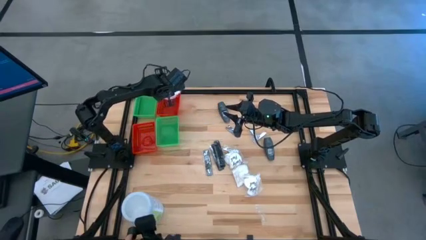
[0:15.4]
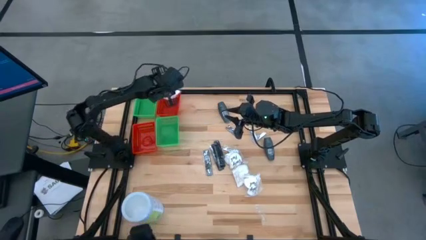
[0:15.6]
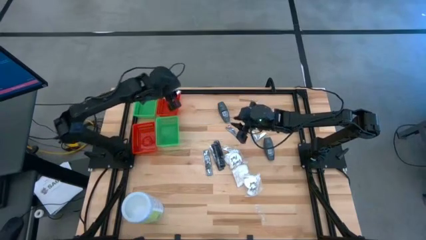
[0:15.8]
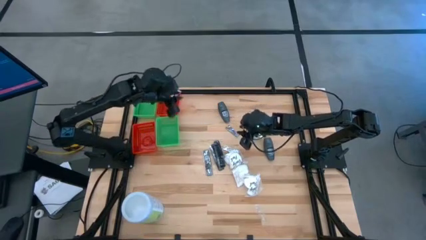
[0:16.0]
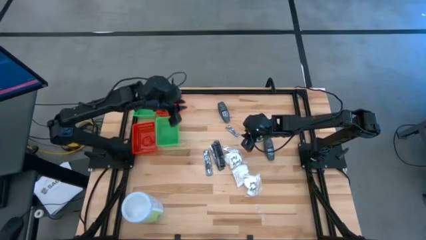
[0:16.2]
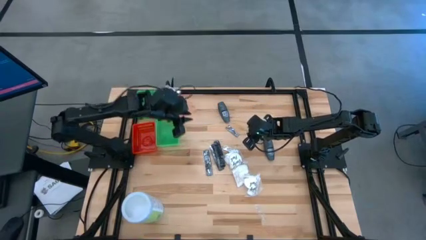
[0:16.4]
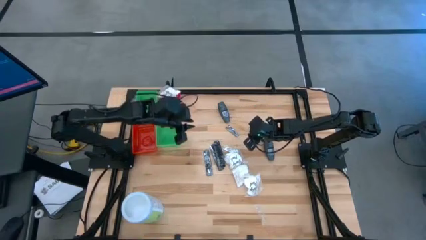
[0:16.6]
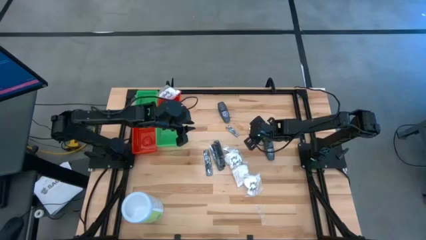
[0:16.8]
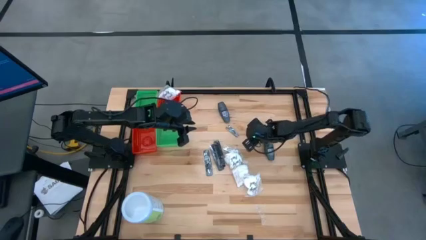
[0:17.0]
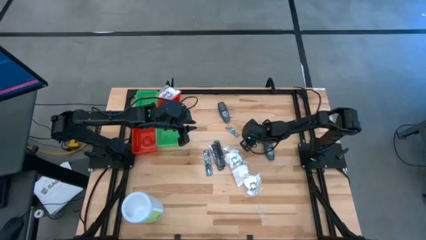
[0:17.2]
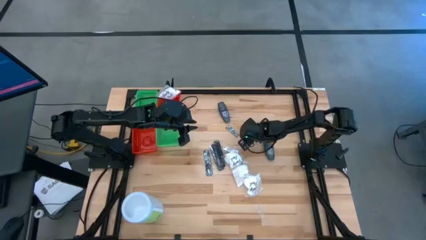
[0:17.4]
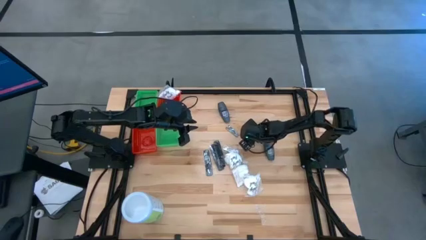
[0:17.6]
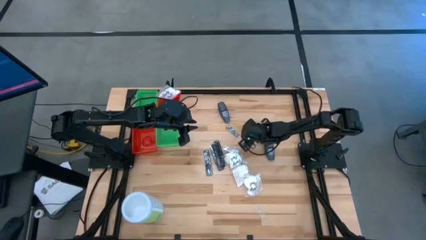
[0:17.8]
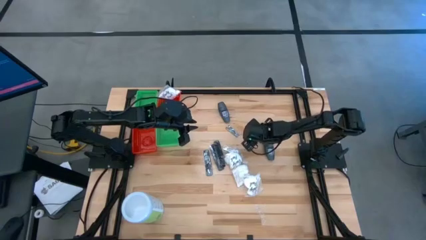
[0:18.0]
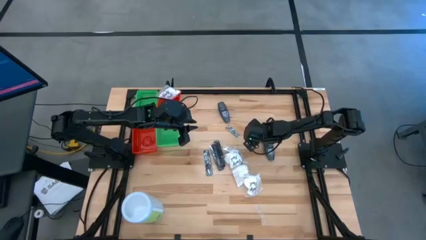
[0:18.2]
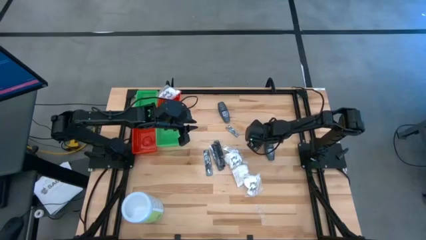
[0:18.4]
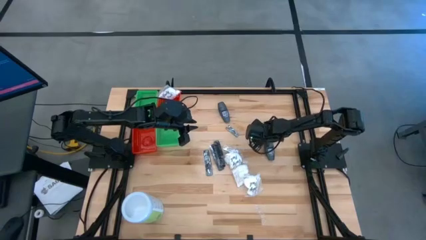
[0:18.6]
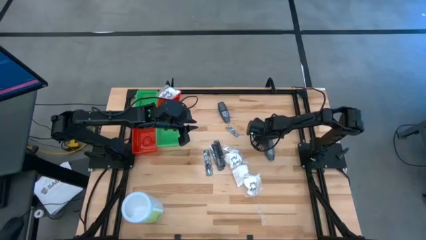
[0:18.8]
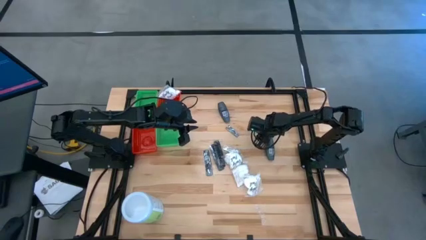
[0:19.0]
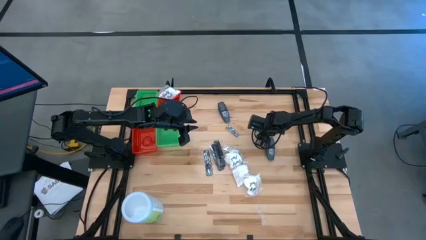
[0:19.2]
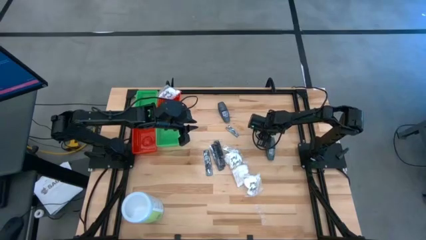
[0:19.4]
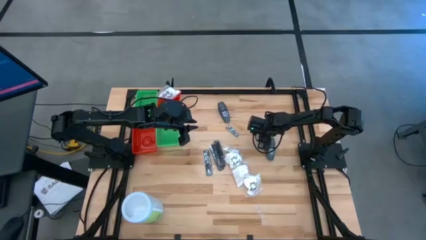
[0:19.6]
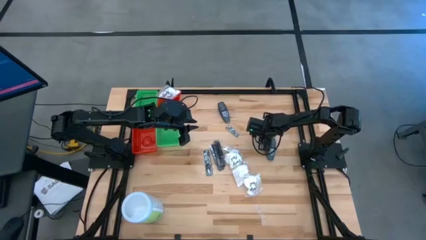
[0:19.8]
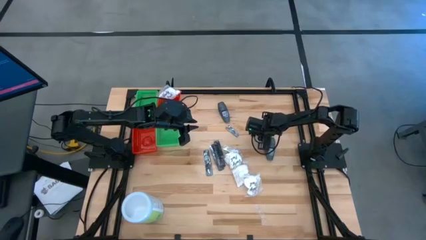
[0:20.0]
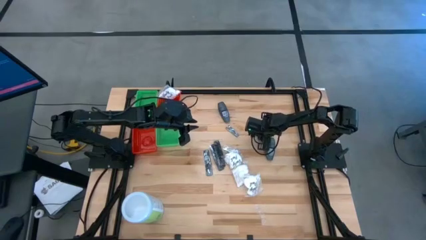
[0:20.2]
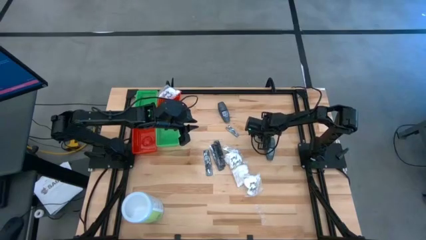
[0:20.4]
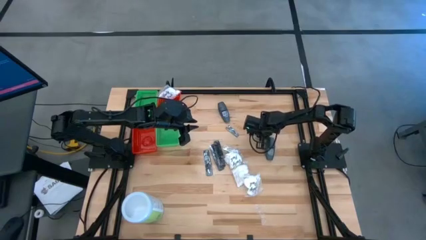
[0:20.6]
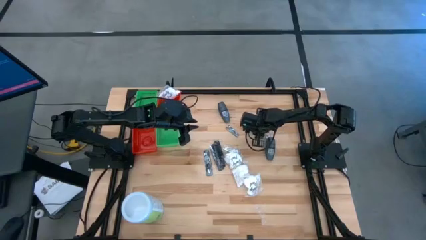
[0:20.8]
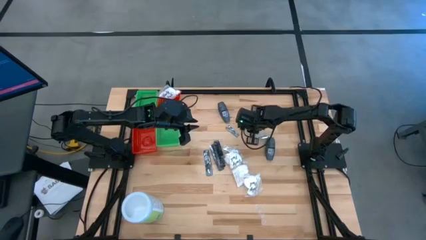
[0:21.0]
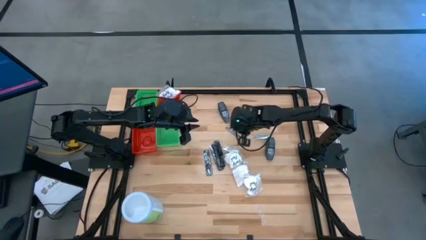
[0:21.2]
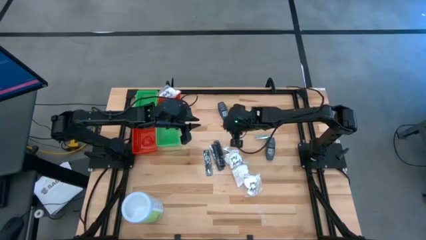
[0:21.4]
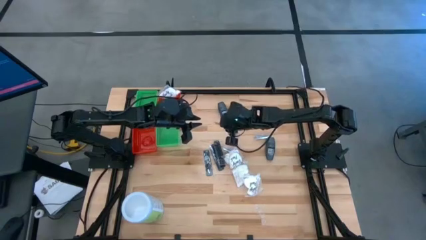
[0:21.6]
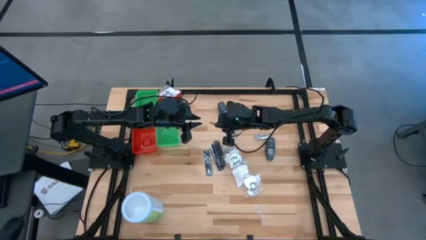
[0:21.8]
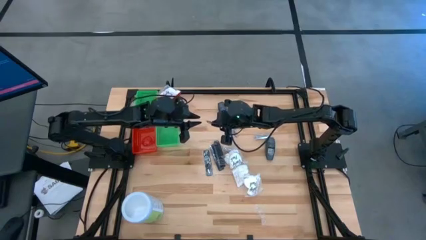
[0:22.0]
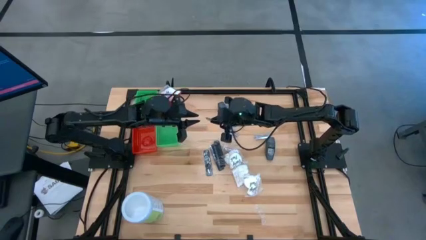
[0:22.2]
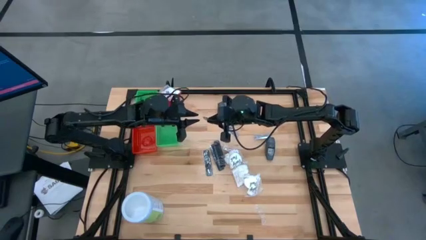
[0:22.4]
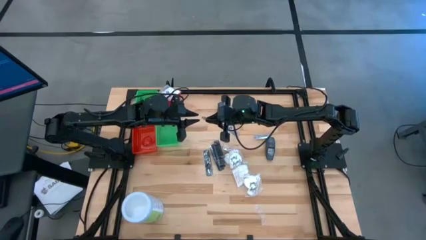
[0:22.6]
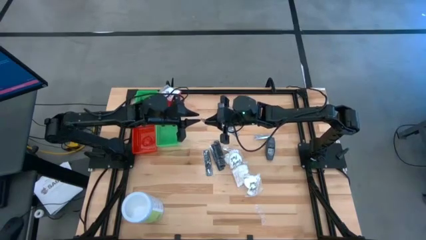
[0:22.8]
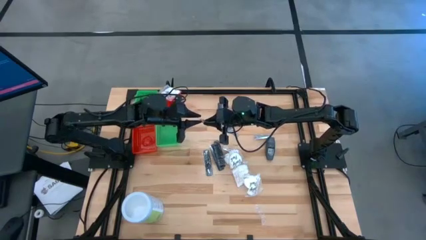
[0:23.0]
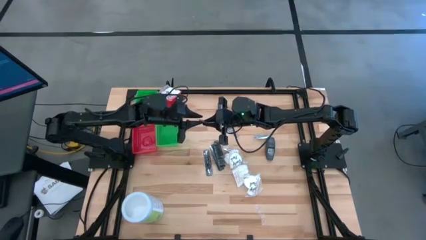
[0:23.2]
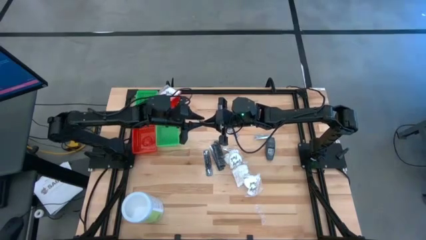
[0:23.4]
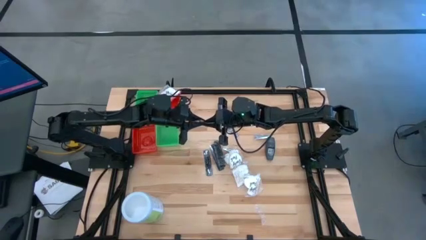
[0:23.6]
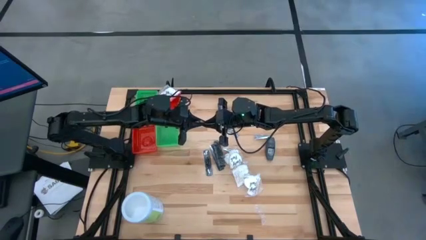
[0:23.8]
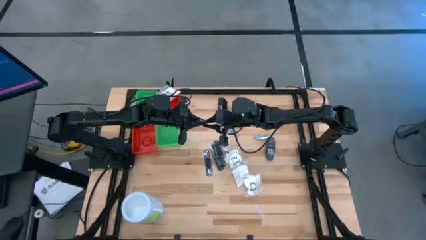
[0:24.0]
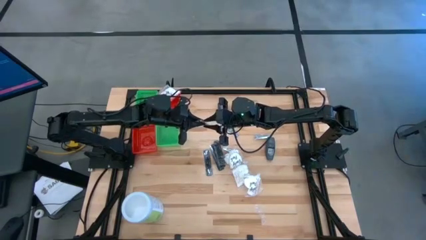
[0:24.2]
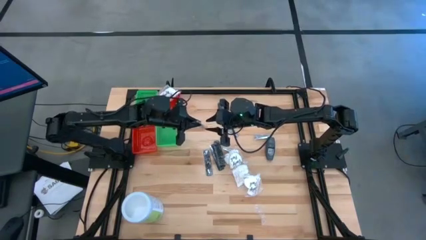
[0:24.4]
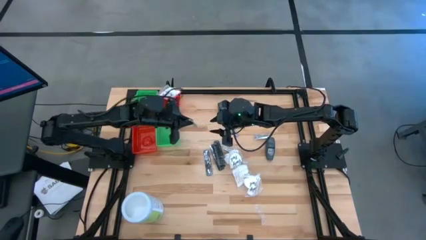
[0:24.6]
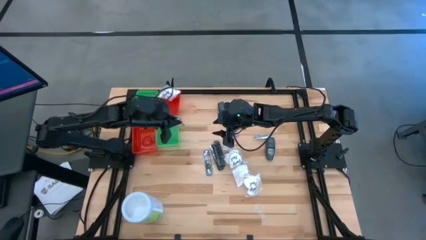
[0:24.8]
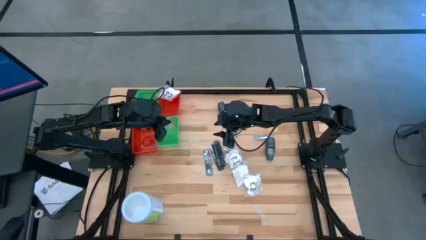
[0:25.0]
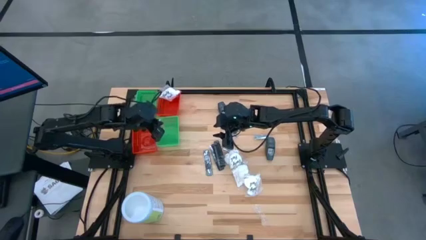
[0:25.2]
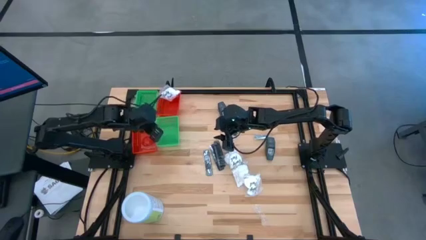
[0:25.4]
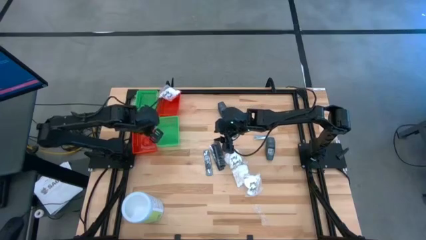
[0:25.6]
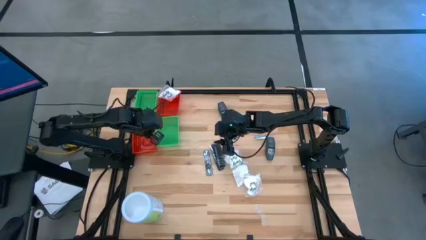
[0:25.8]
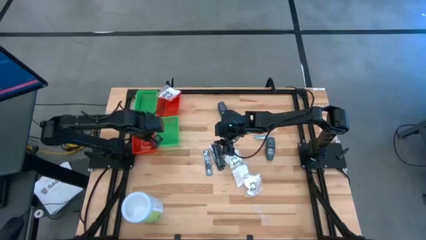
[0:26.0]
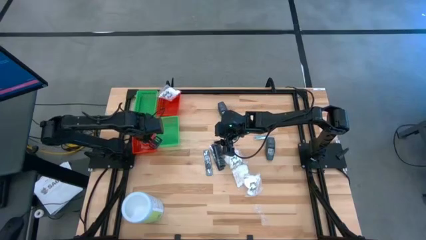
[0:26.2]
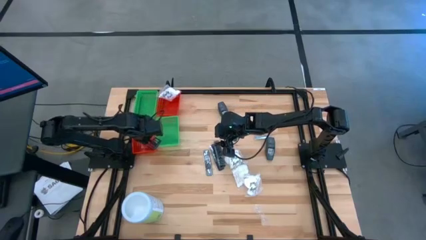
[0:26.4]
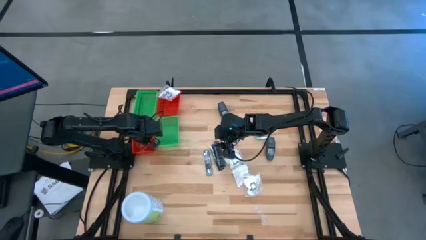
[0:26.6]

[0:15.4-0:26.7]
Task: Pick & Place Travel size toiletries
Put the silver nail cutter into the bottom red bin
